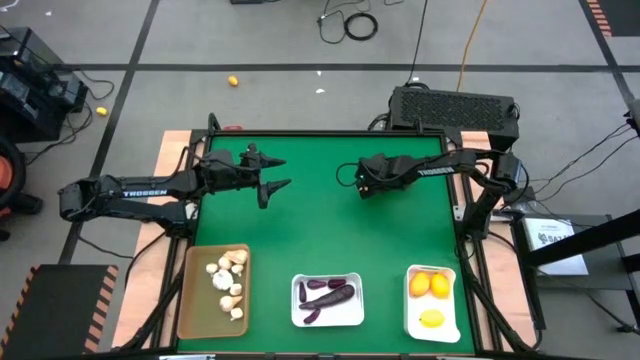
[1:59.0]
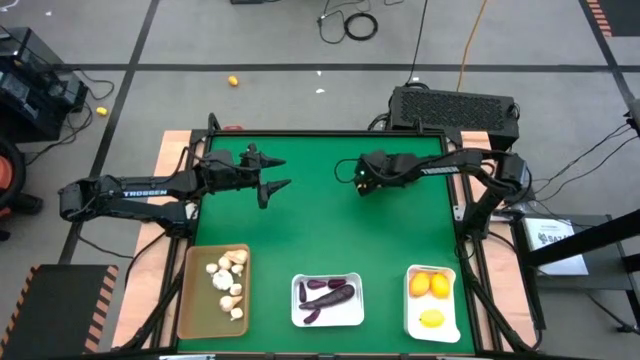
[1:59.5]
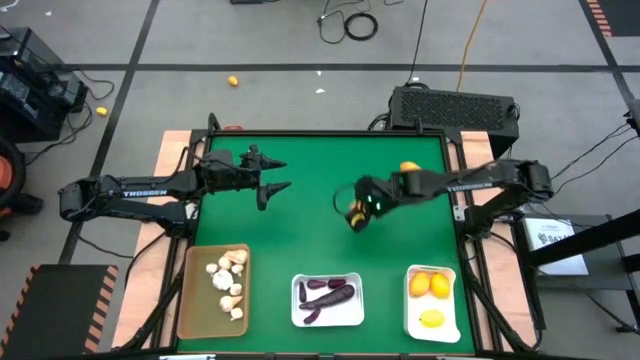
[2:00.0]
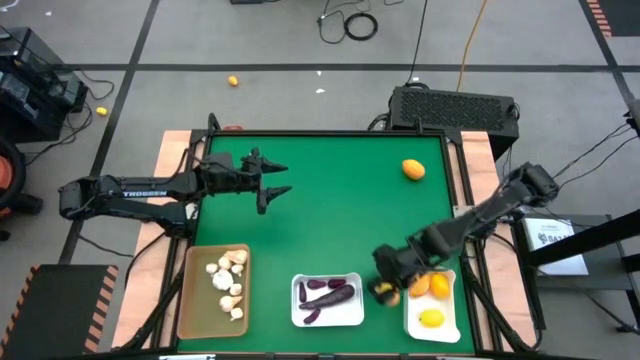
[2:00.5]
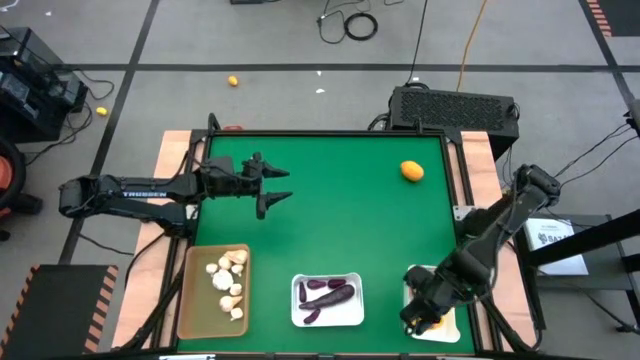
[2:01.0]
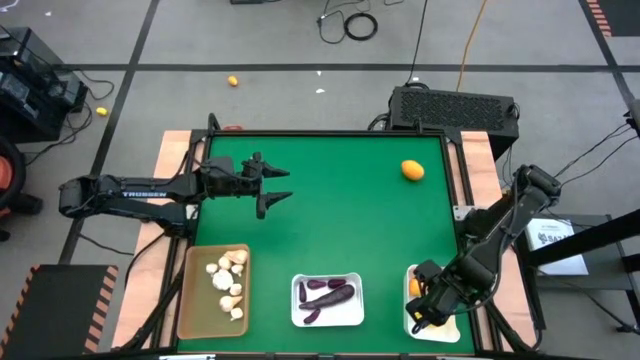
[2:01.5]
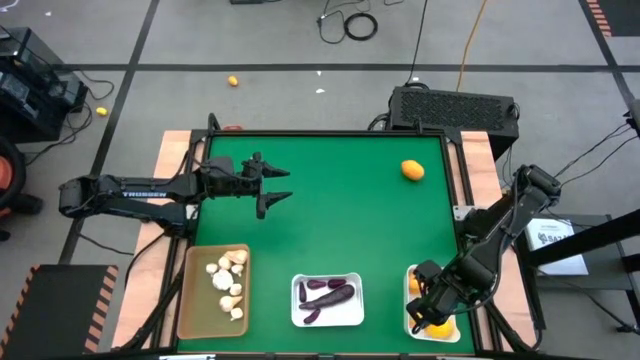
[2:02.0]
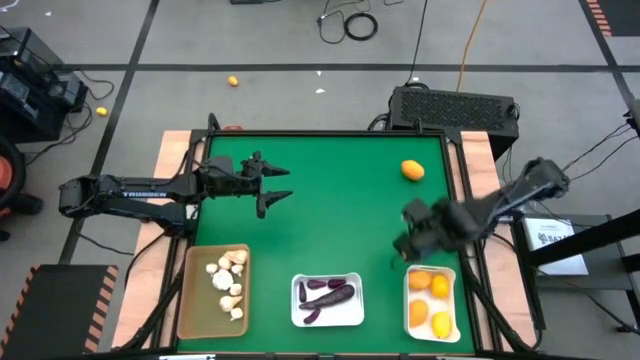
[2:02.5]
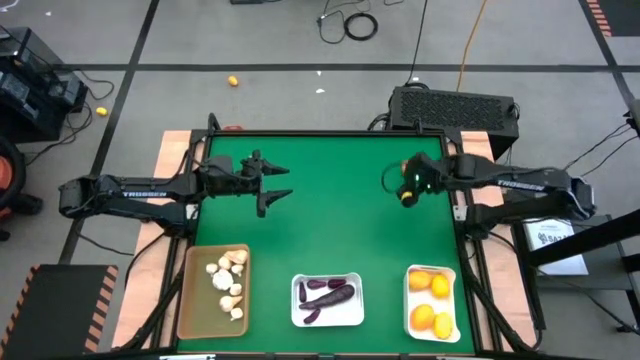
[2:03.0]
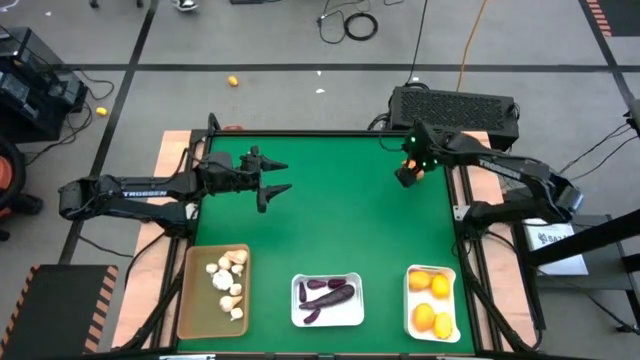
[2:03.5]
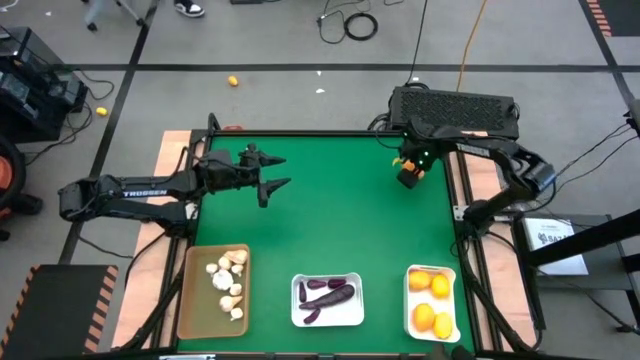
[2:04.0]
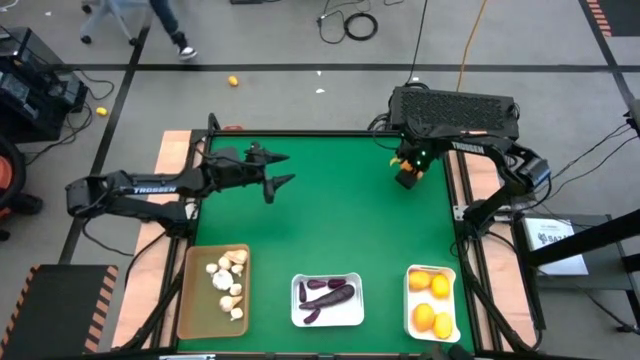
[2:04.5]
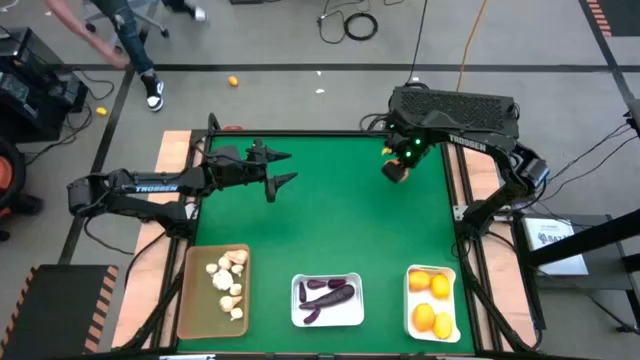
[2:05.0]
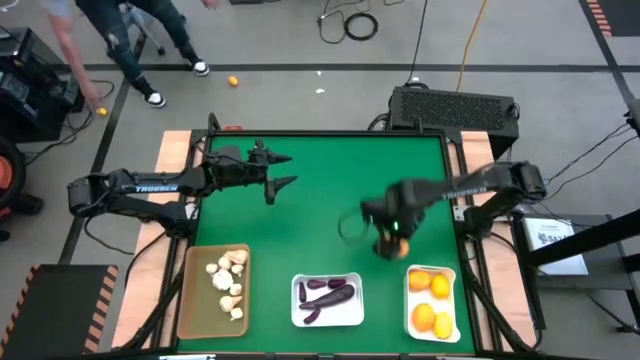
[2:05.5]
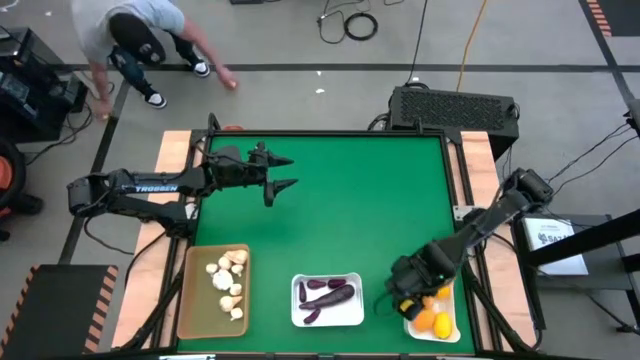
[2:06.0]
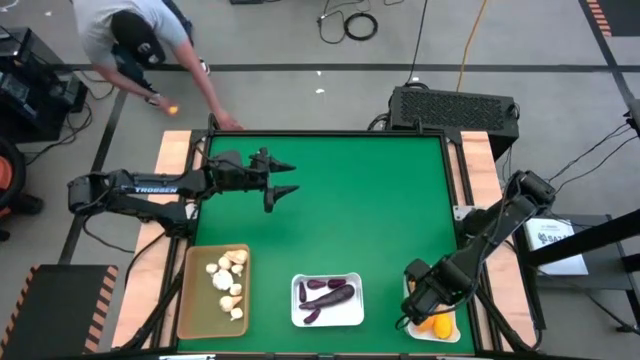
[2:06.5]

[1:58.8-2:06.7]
Task: Sort produce into baskets
Put the lemon into the right white bin

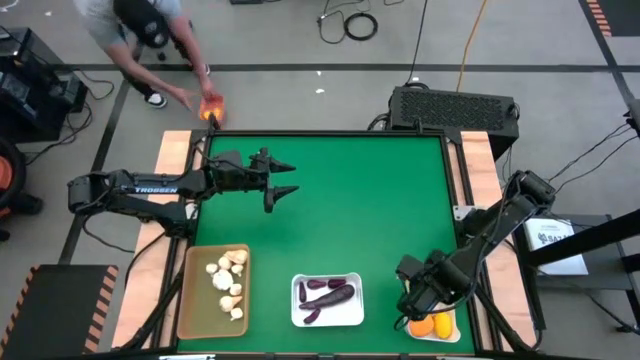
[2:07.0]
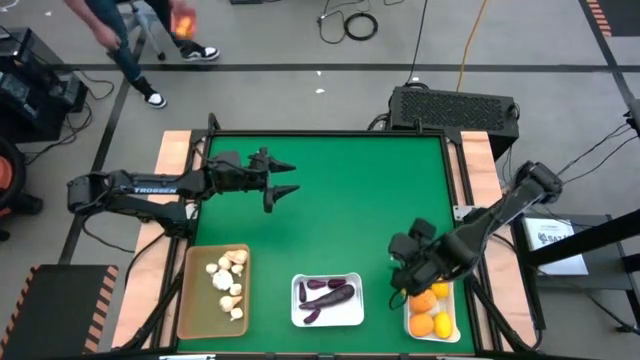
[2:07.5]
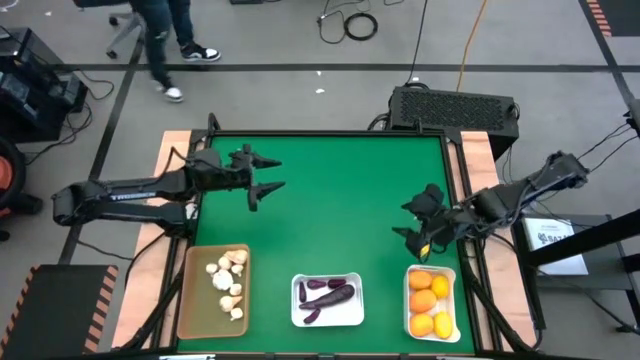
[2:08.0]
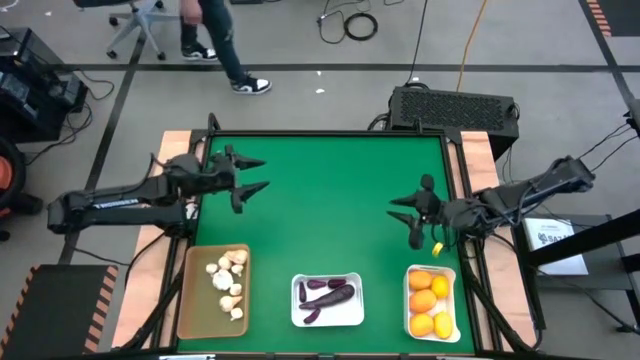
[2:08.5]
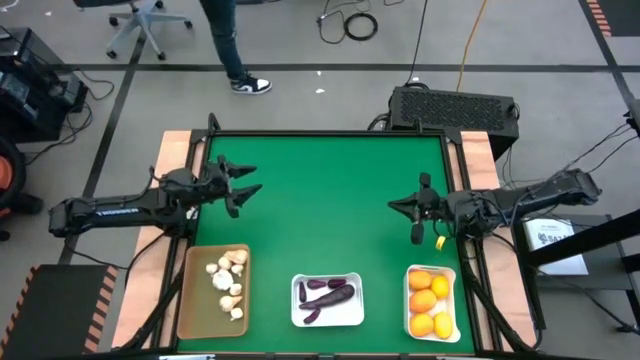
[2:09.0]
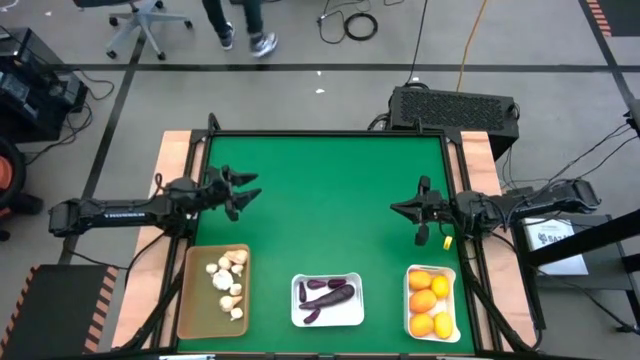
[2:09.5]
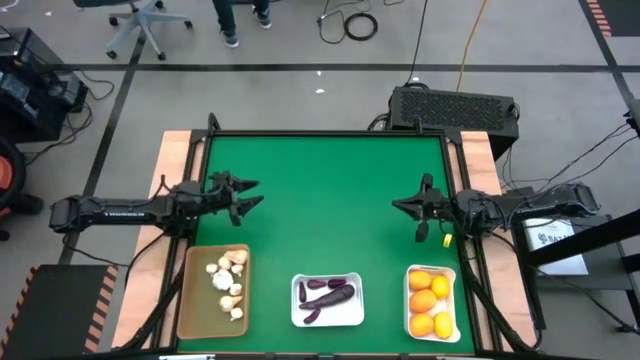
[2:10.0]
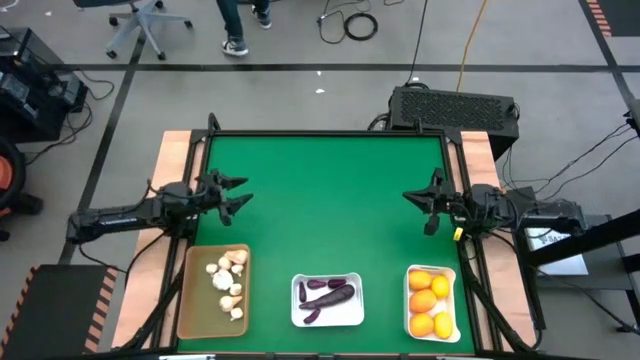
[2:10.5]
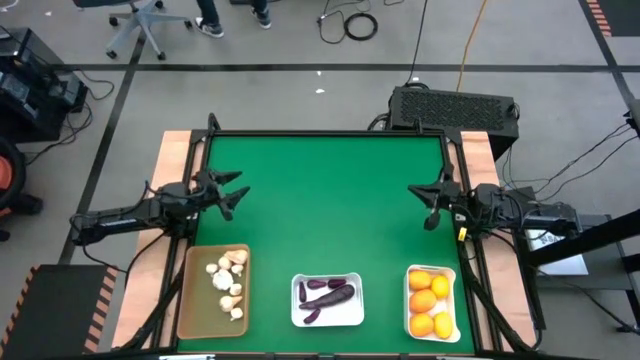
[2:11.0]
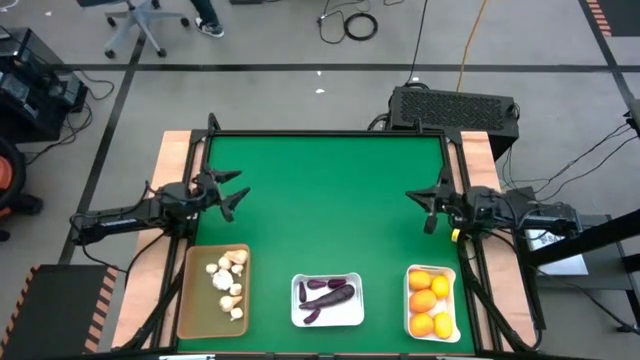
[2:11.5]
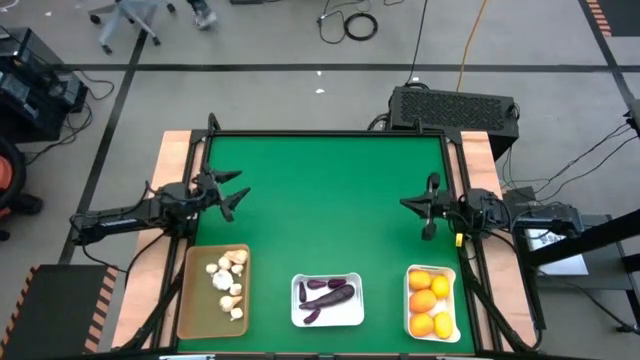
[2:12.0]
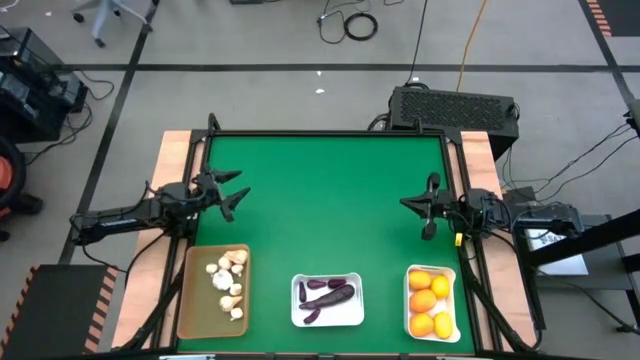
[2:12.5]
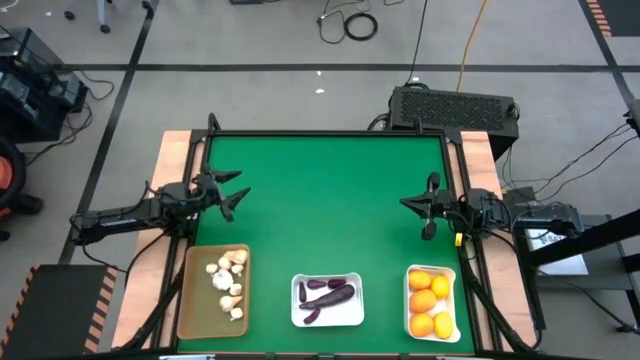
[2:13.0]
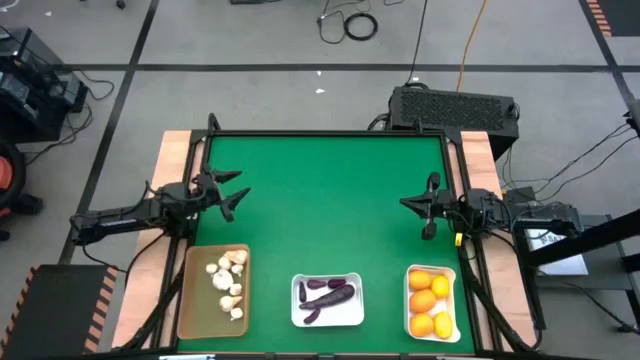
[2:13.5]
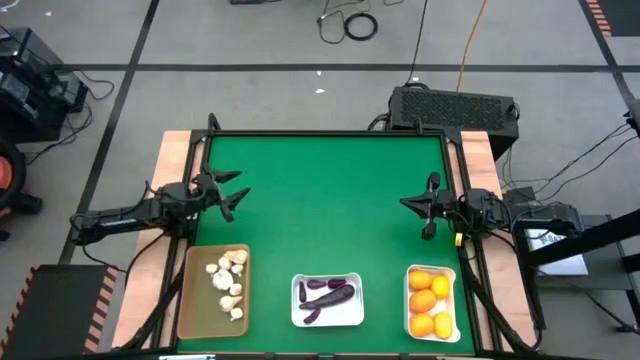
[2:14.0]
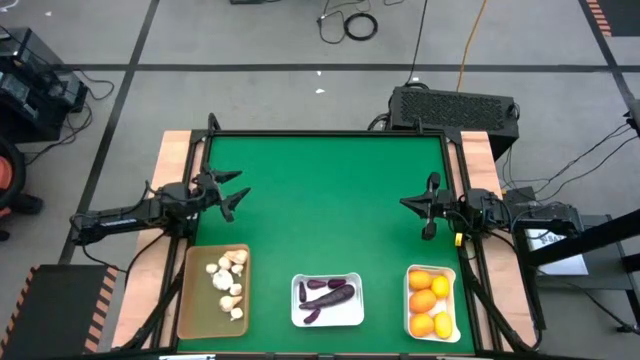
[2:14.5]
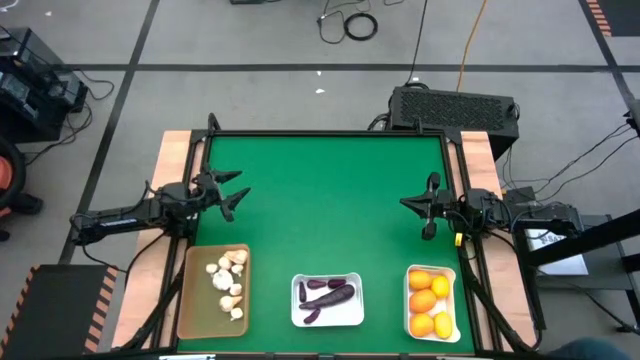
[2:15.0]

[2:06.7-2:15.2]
Return to Home Position

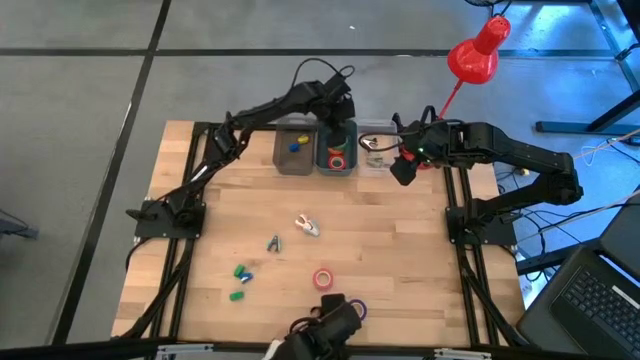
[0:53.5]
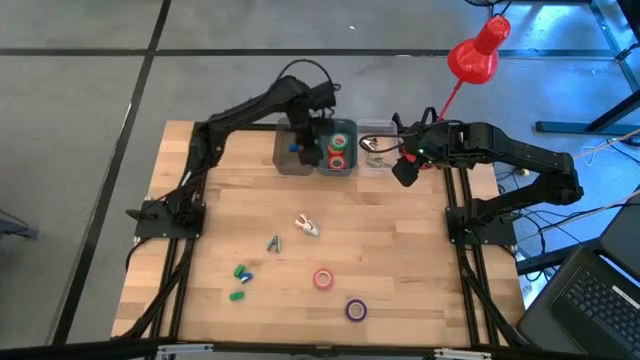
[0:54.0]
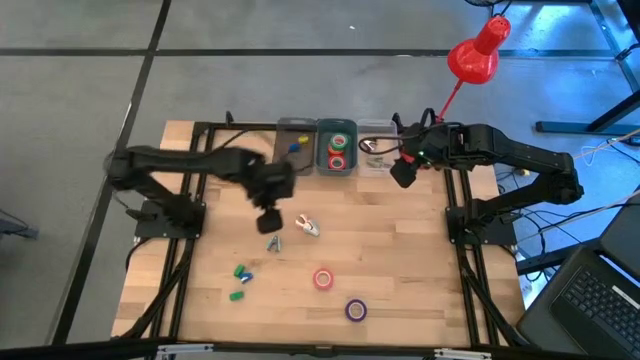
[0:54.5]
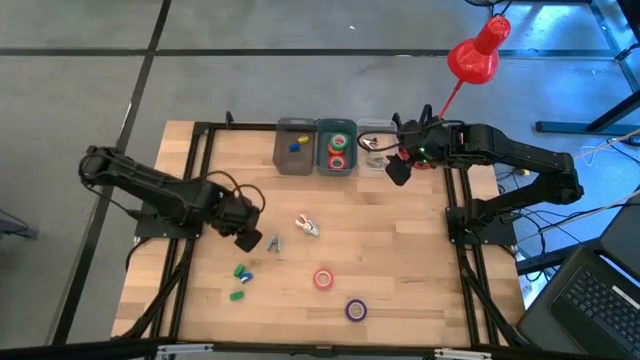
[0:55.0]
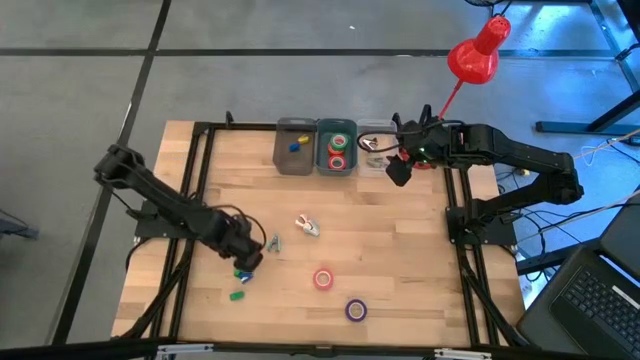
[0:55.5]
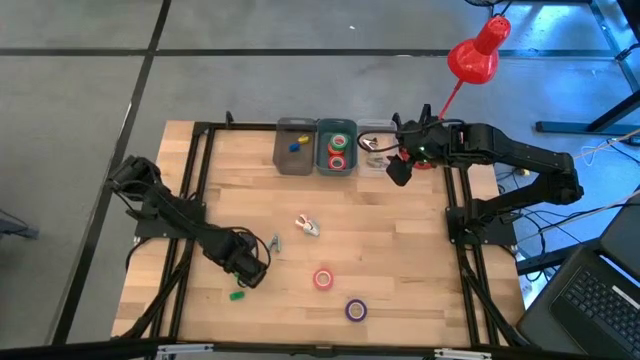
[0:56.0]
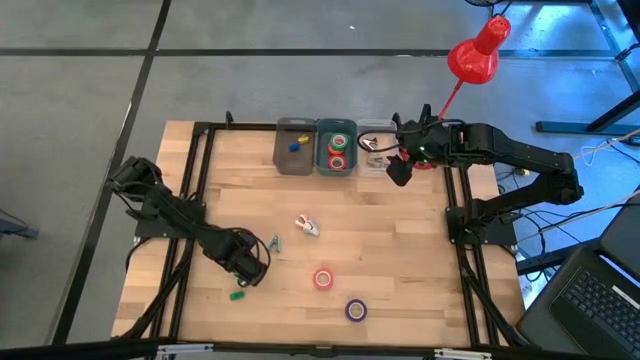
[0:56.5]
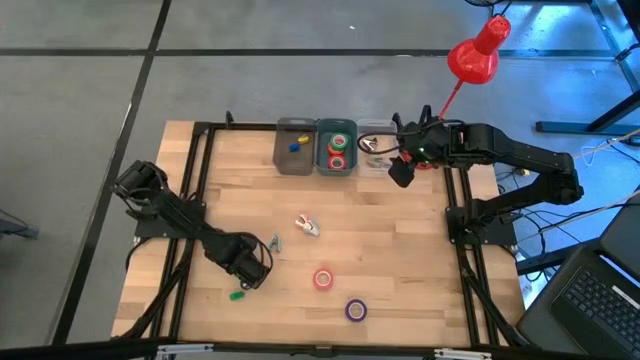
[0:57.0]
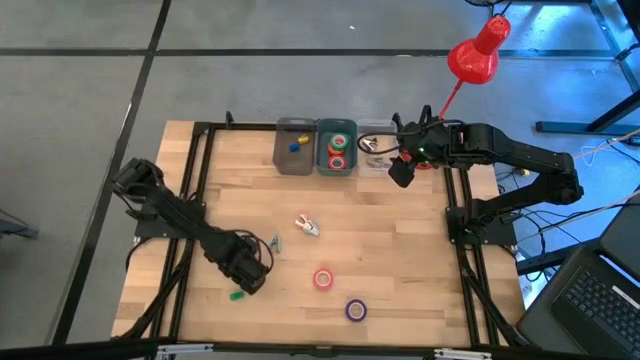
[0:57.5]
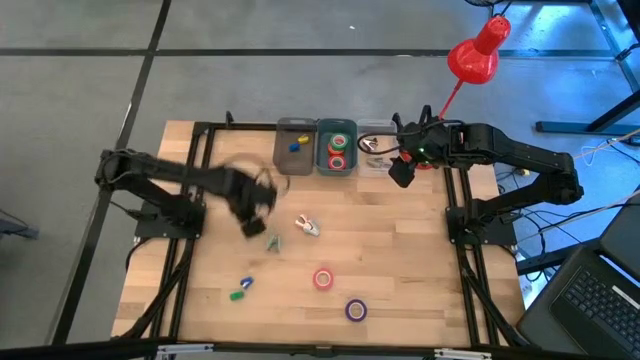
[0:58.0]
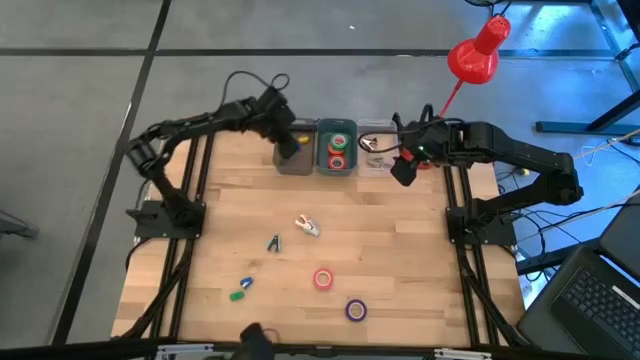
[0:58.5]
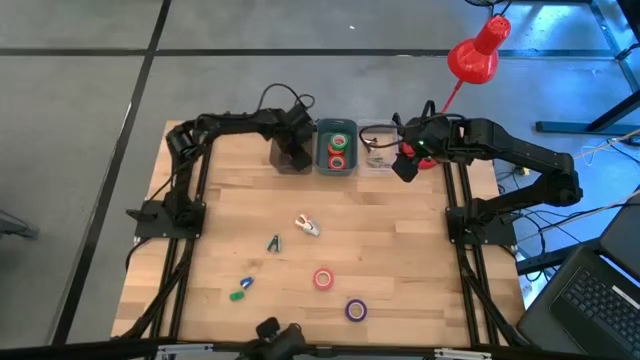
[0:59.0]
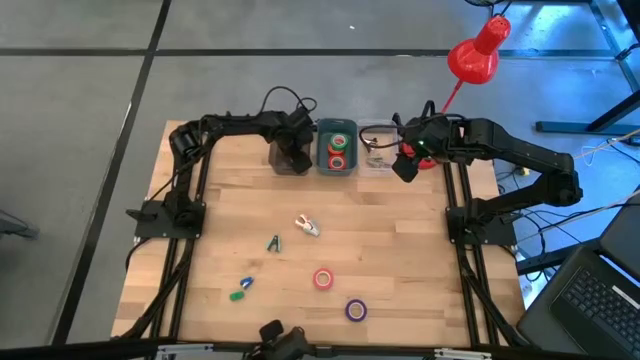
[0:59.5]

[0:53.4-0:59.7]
Task: Pick and place Stapler, Stapler remover, tape
Put the top green stapler into the black bin
